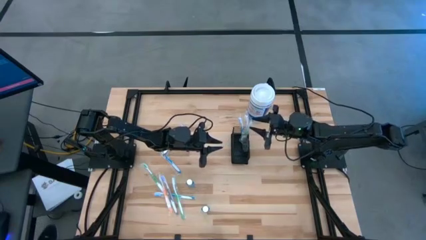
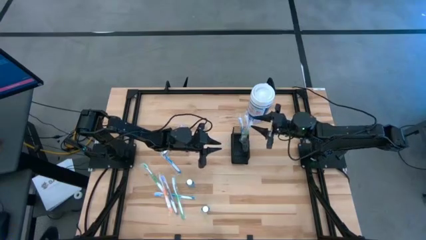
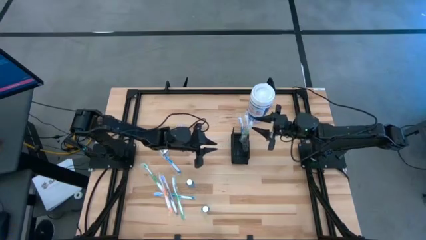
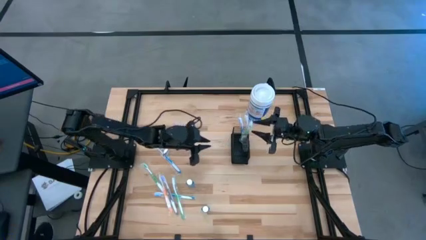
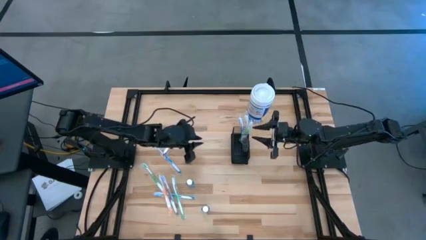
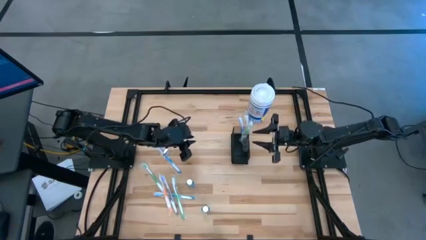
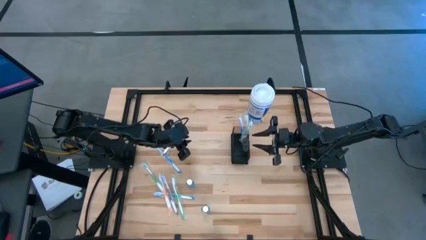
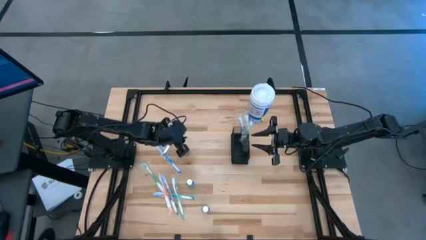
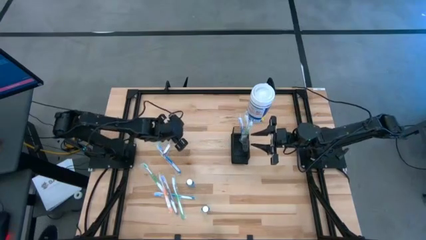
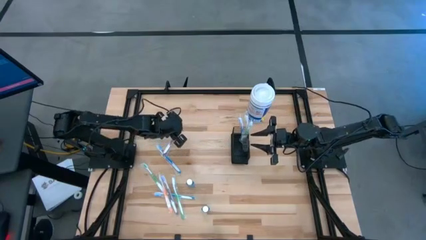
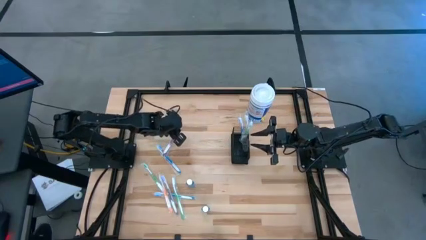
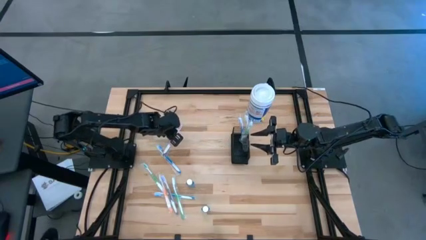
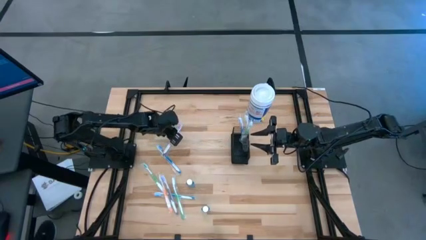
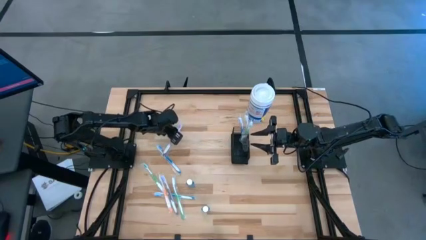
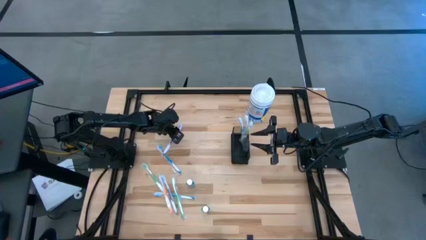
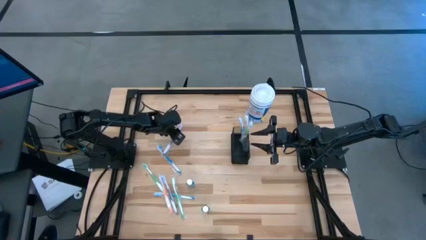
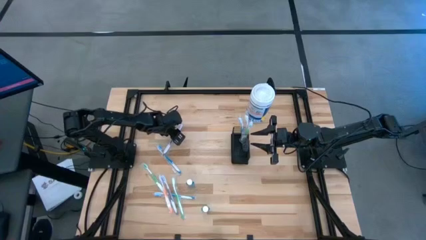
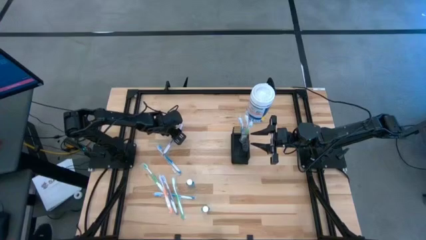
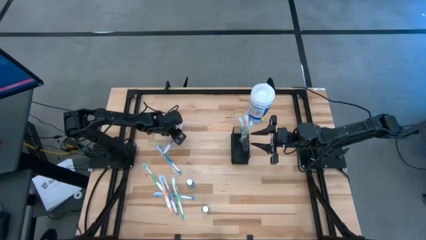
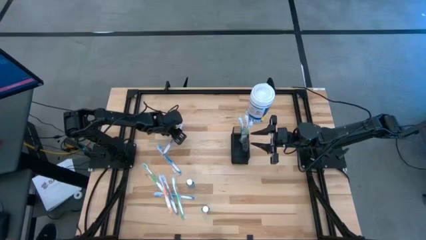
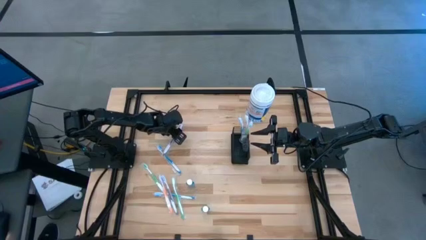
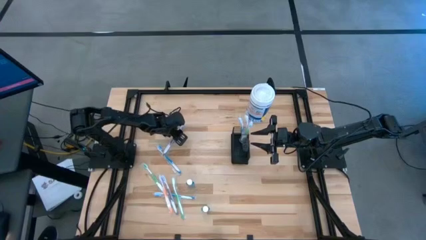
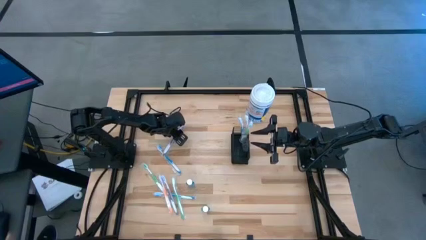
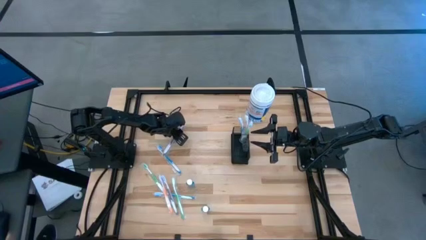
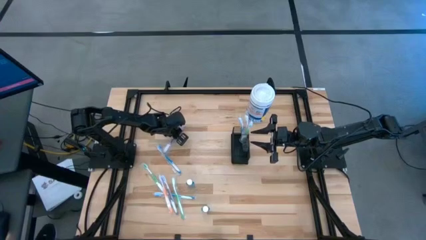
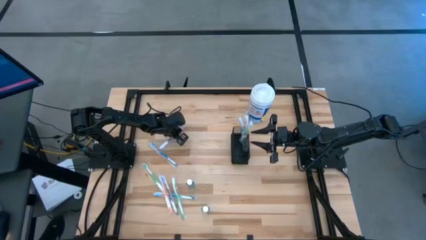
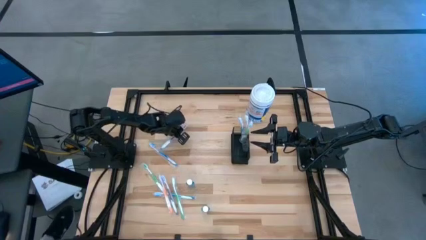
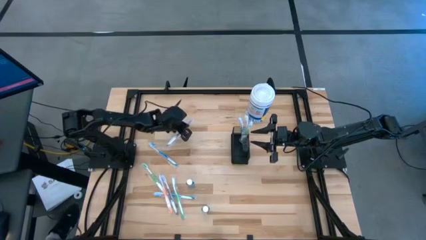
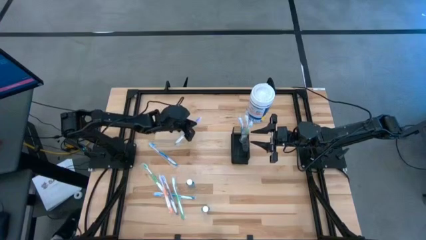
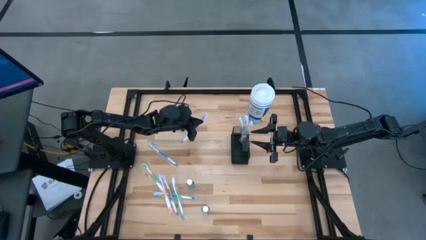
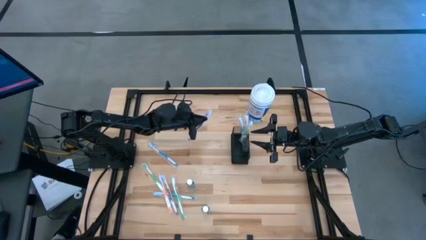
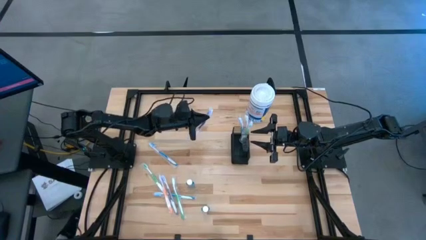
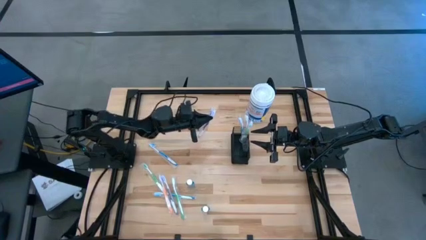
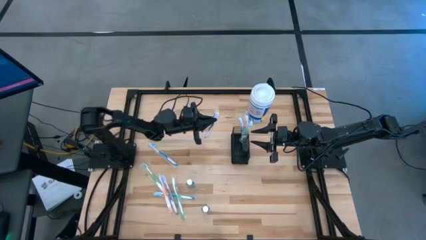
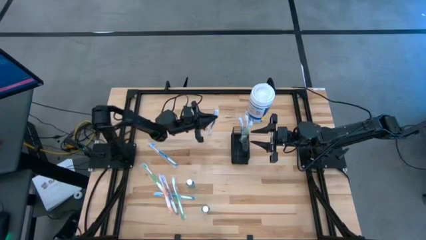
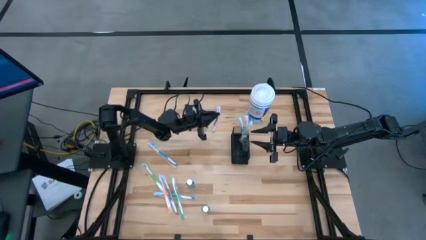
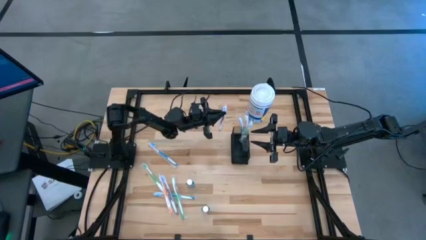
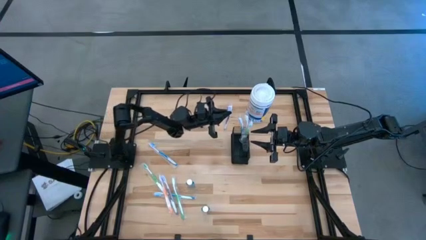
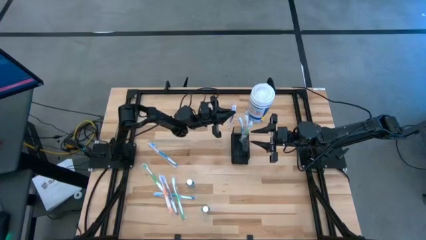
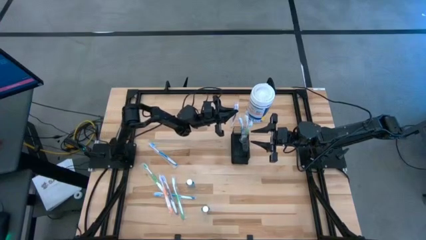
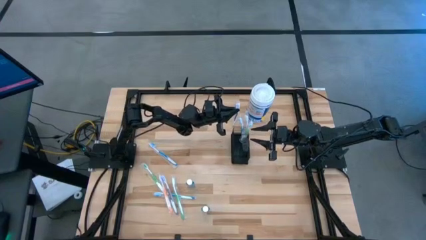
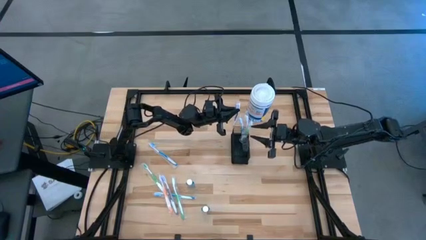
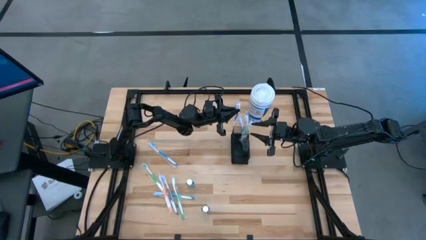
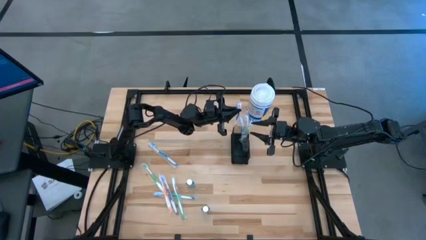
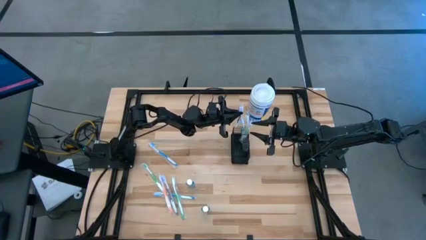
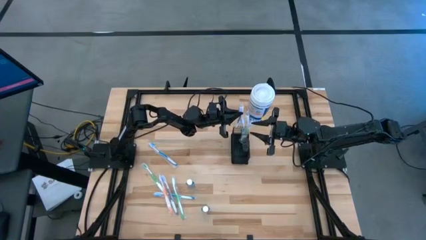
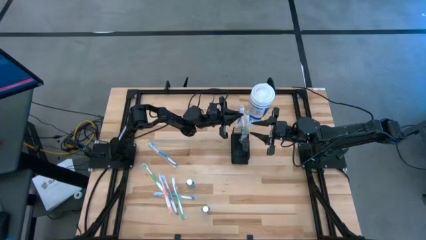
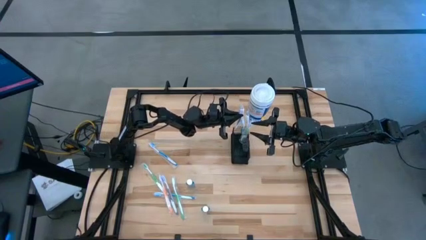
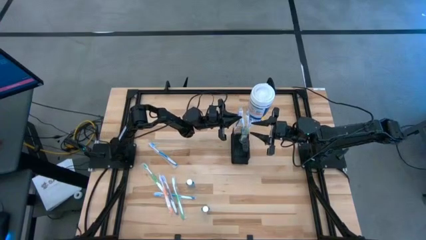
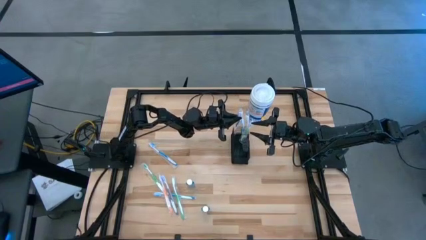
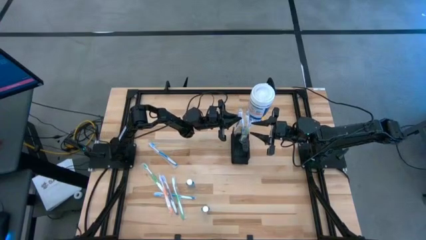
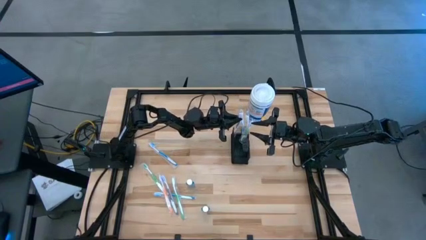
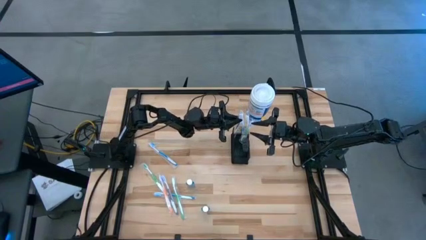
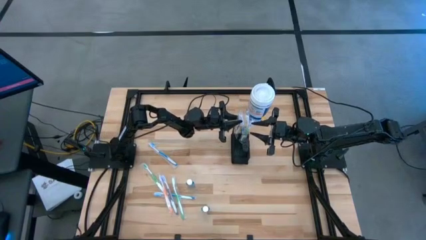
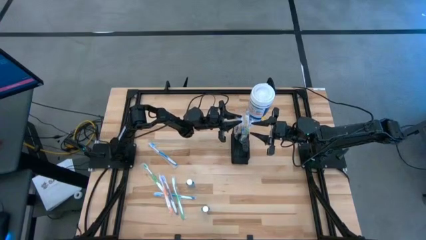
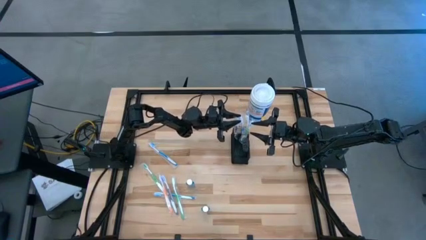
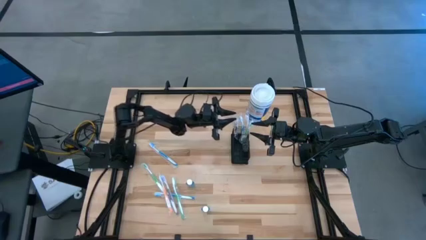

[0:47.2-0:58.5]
Task: Pick & Place toothbrushing station
Put the top purple toothbrush into the wire mesh organizer

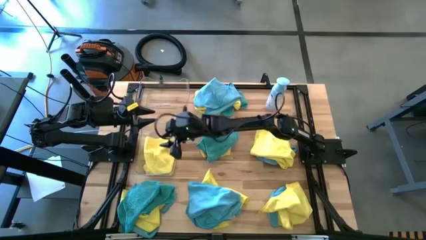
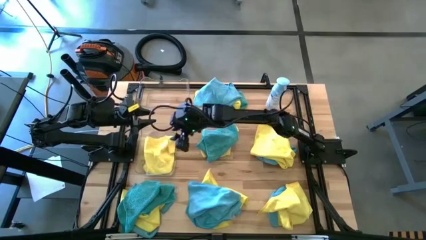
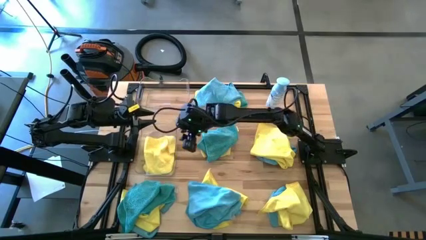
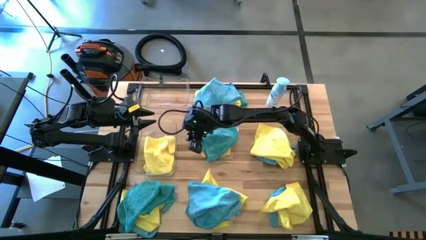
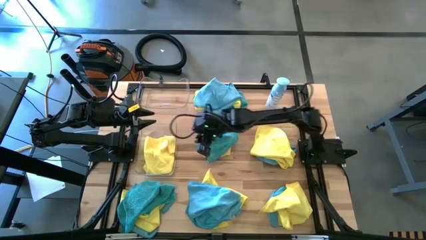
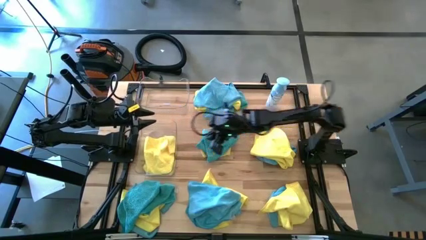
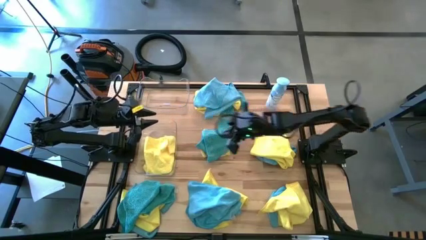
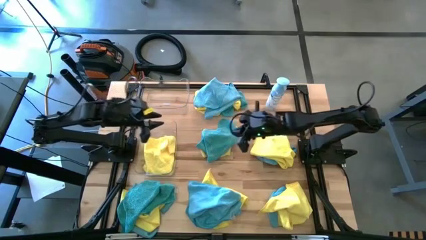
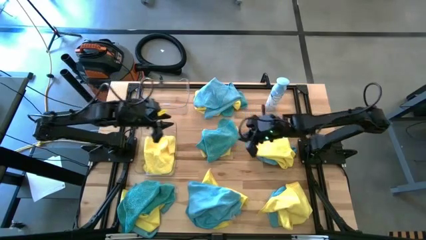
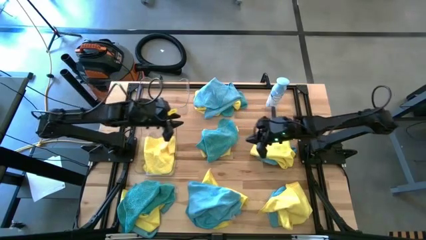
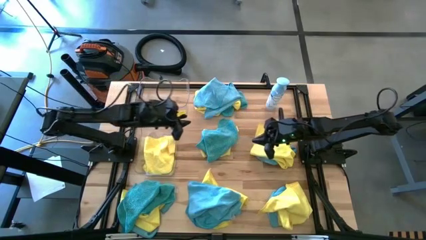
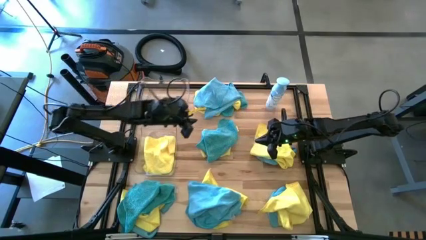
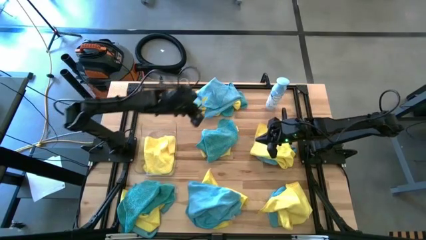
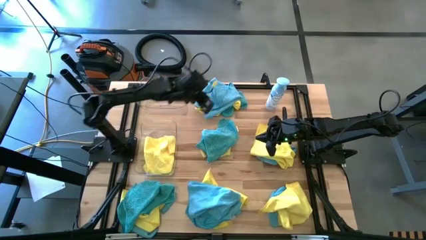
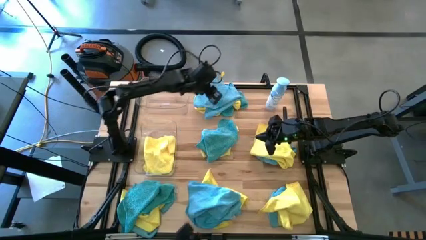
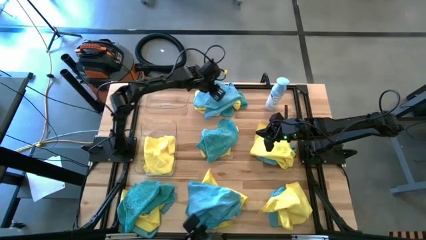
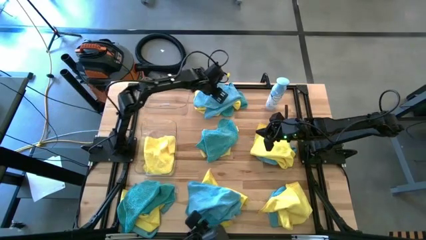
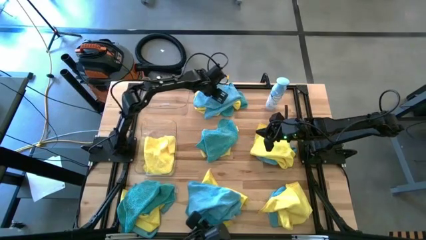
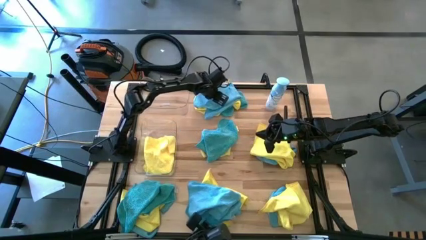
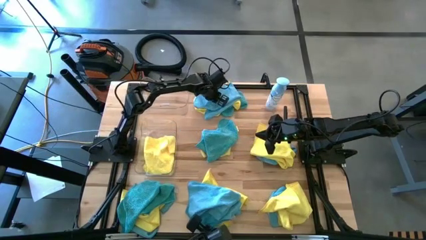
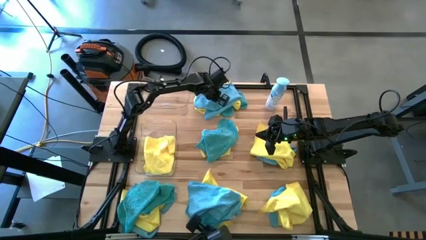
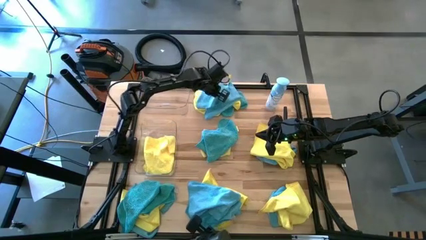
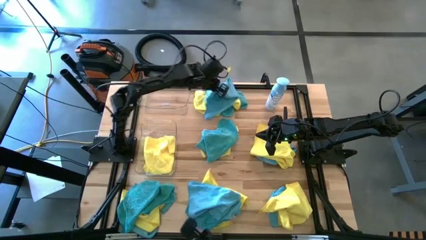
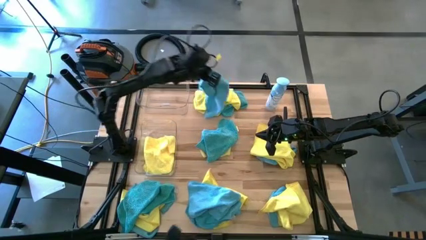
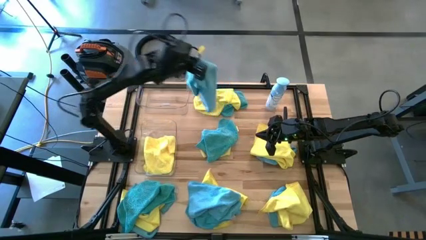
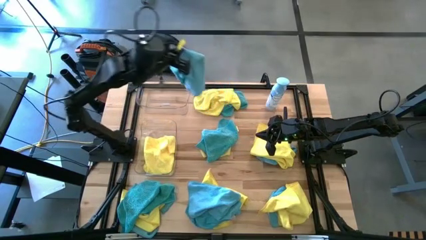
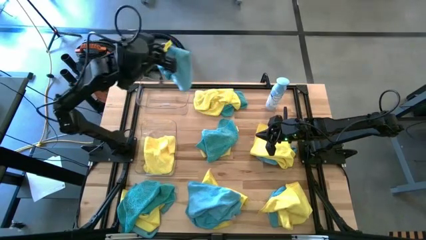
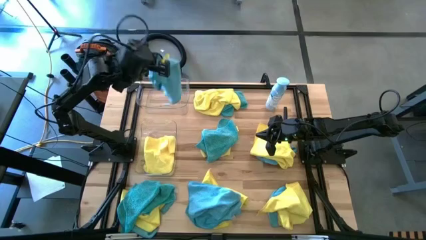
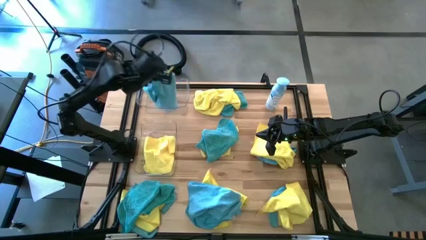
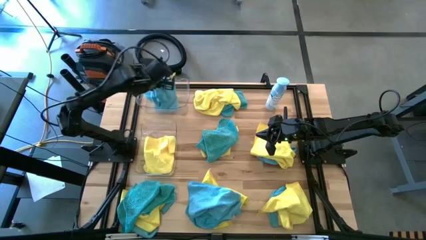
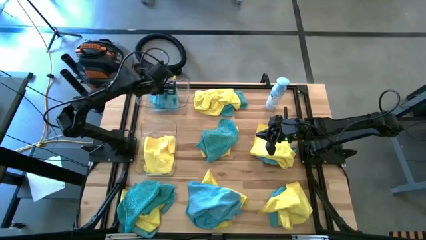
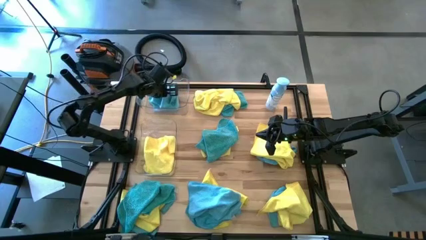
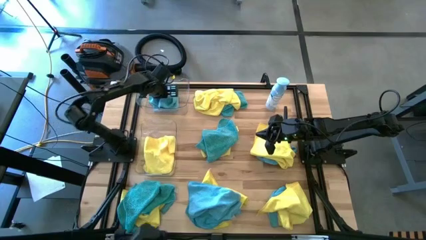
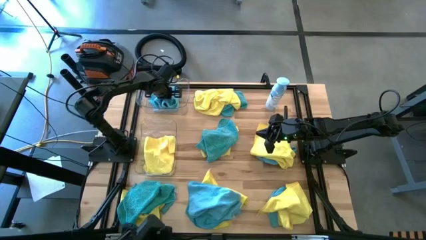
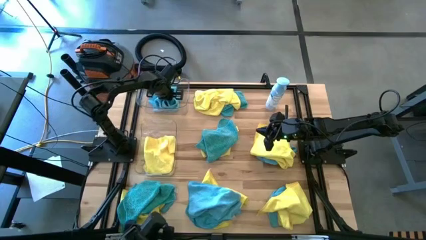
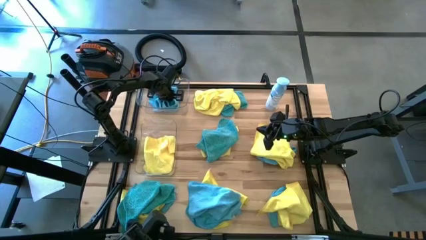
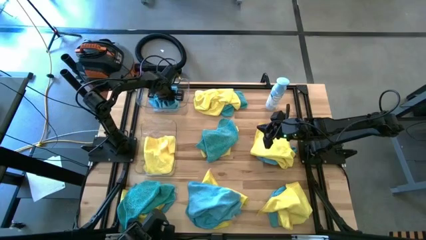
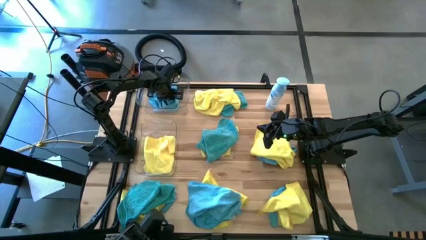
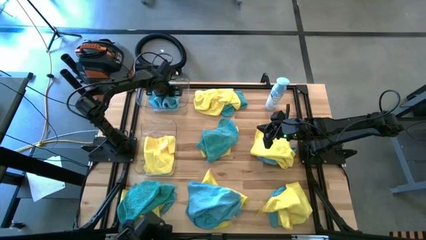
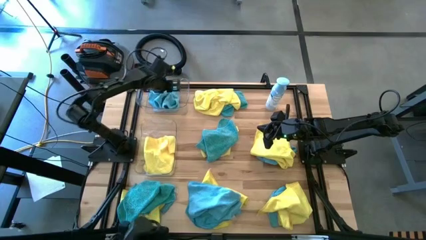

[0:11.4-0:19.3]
Task: Sort microfiber towel by color & place in baskets
Put the blue towel into the top transparent bin
